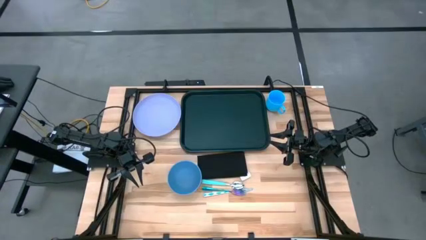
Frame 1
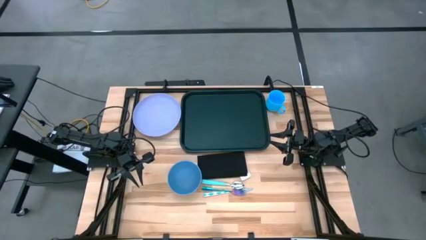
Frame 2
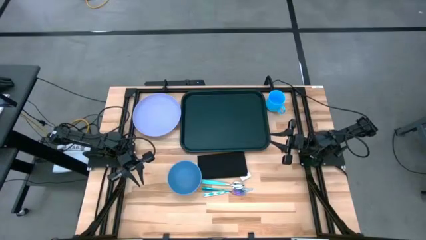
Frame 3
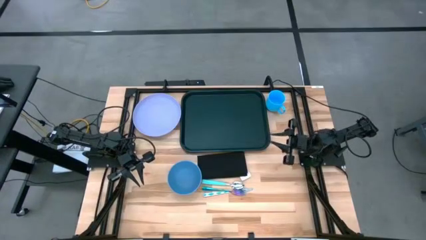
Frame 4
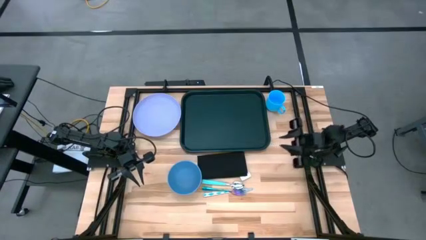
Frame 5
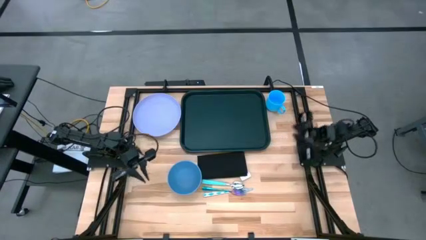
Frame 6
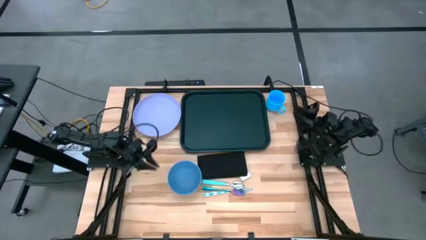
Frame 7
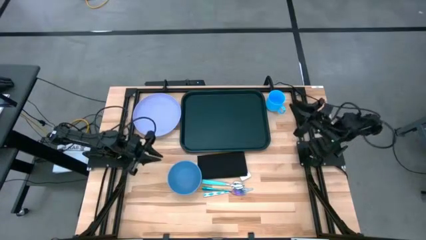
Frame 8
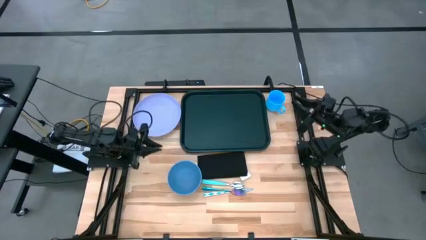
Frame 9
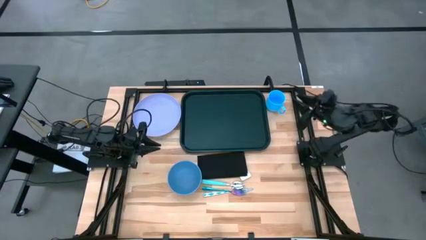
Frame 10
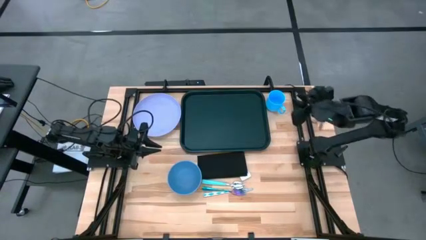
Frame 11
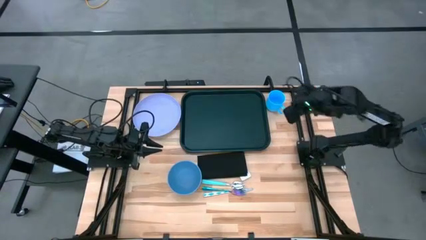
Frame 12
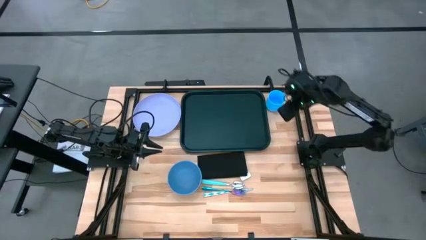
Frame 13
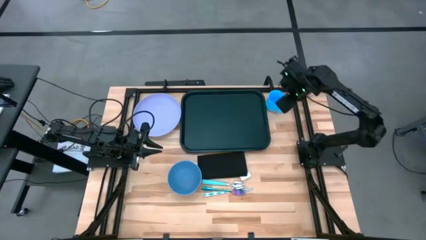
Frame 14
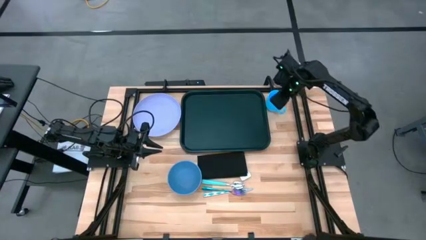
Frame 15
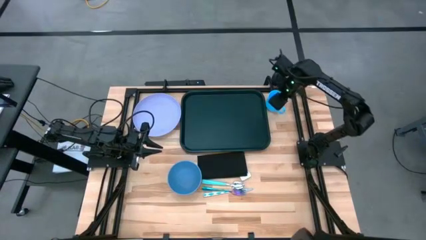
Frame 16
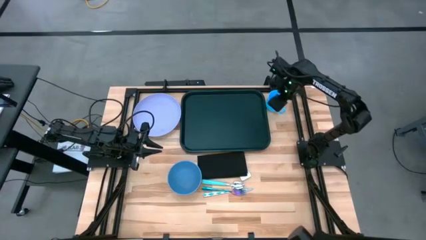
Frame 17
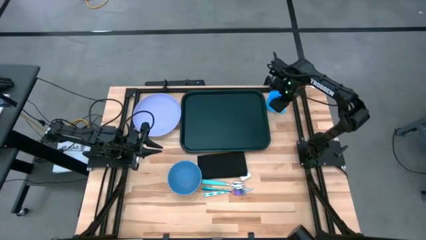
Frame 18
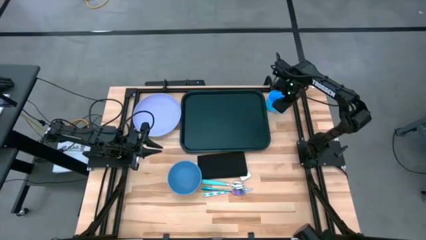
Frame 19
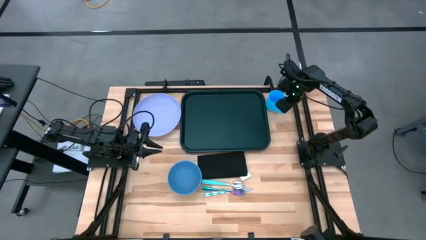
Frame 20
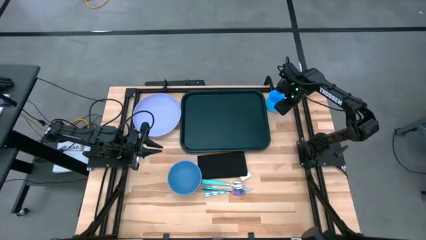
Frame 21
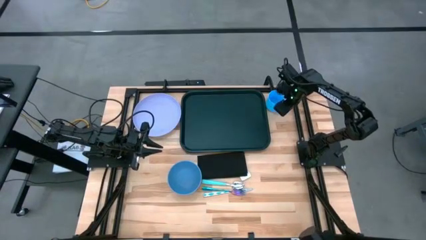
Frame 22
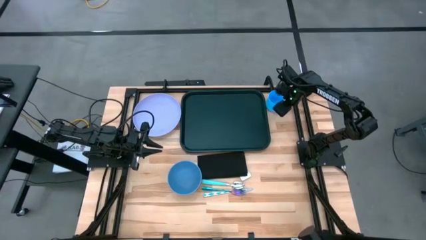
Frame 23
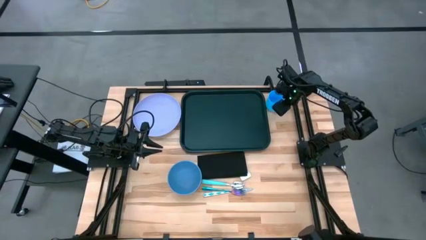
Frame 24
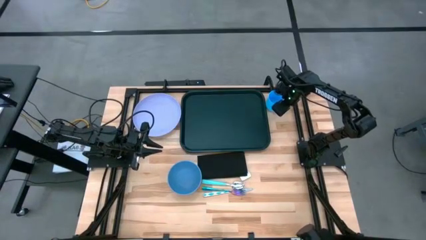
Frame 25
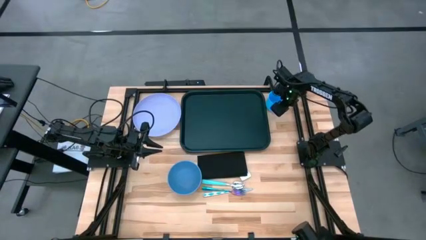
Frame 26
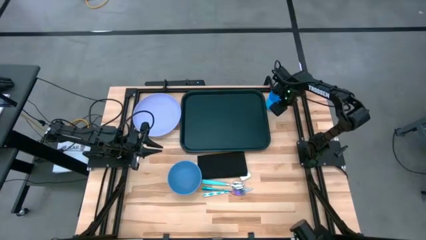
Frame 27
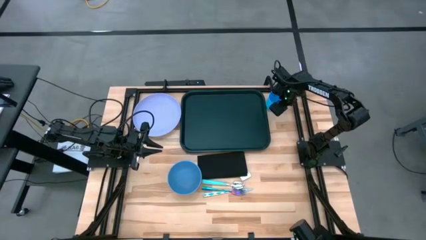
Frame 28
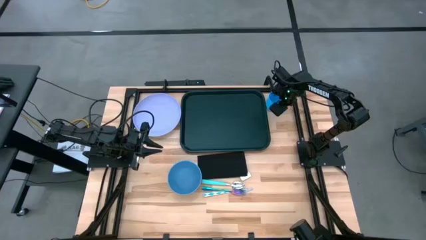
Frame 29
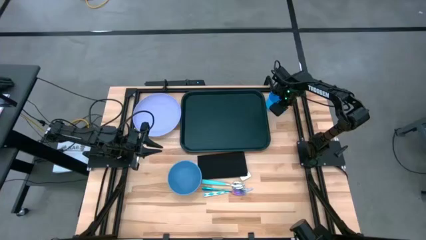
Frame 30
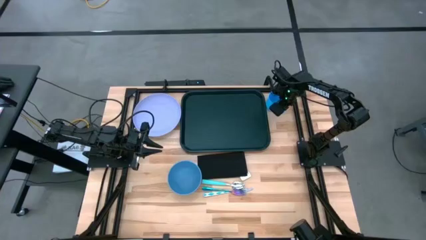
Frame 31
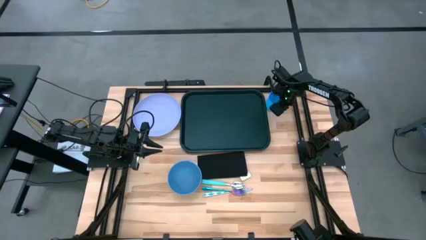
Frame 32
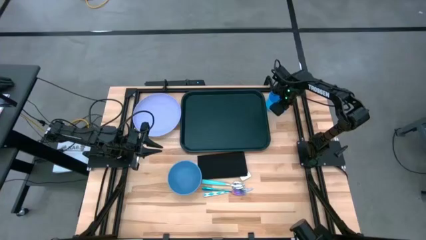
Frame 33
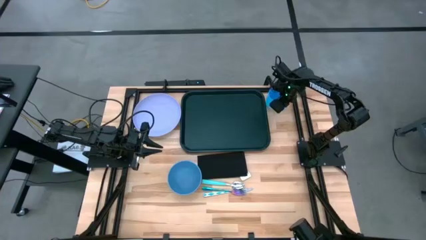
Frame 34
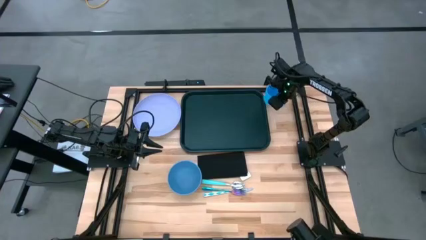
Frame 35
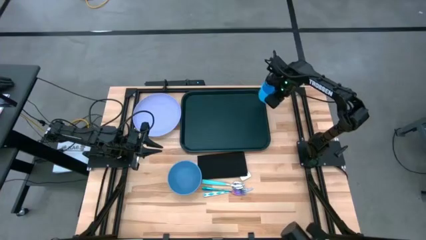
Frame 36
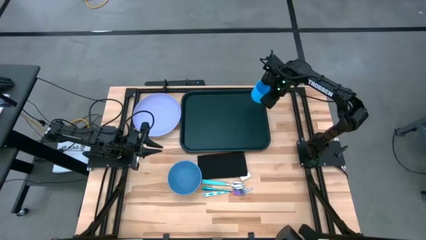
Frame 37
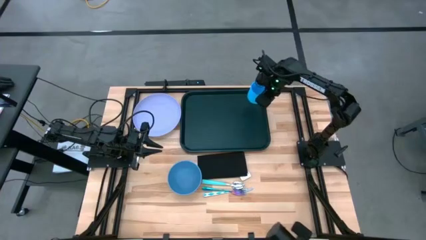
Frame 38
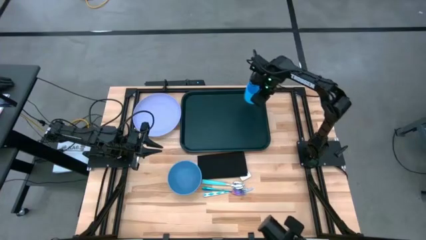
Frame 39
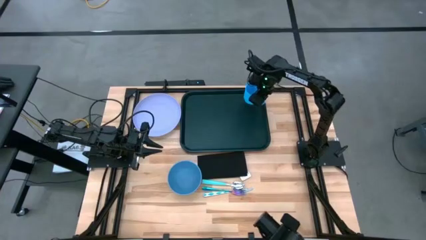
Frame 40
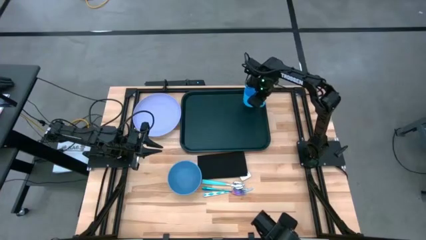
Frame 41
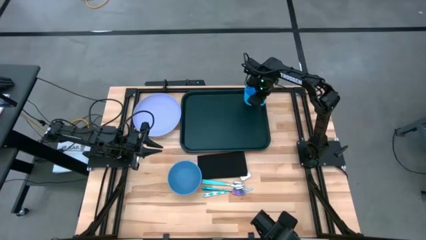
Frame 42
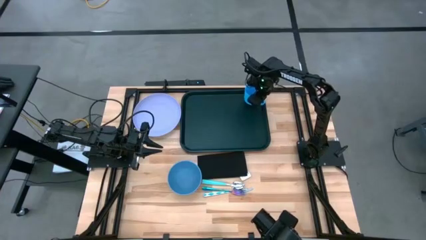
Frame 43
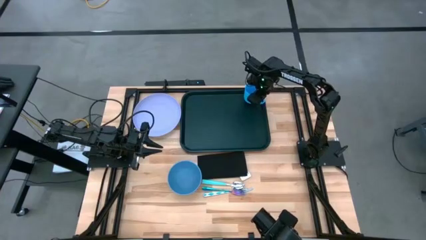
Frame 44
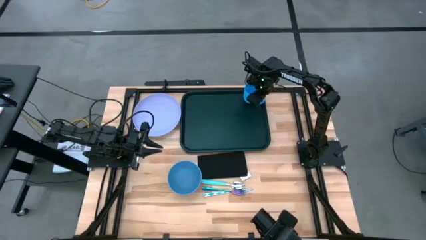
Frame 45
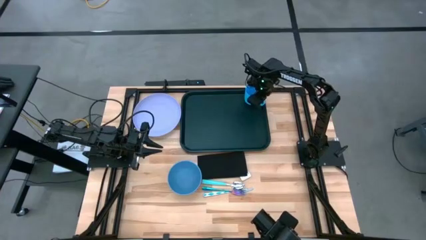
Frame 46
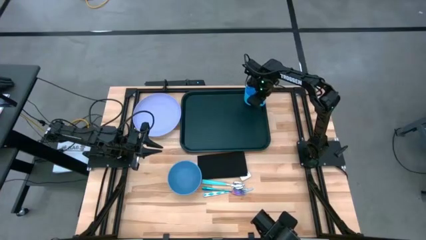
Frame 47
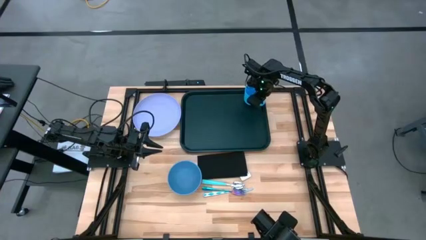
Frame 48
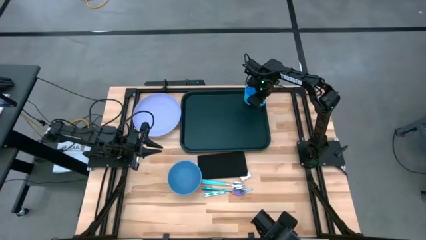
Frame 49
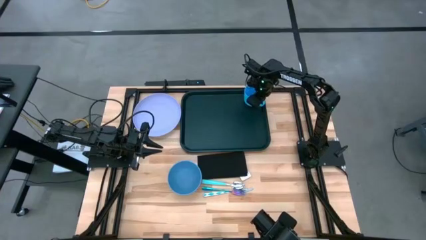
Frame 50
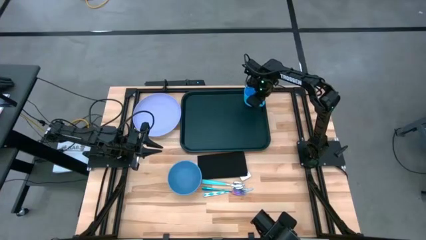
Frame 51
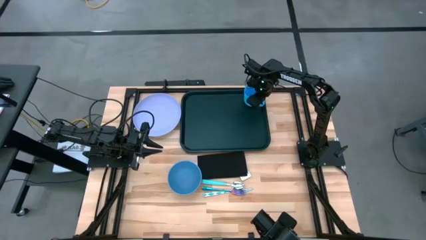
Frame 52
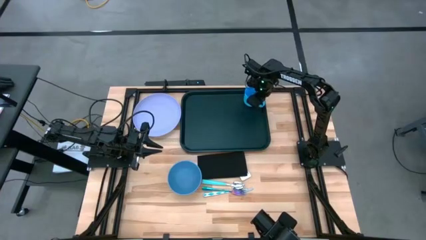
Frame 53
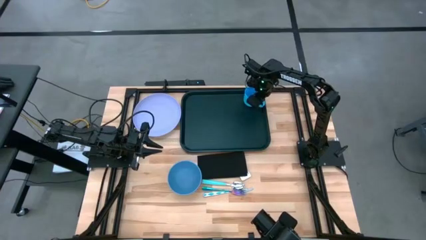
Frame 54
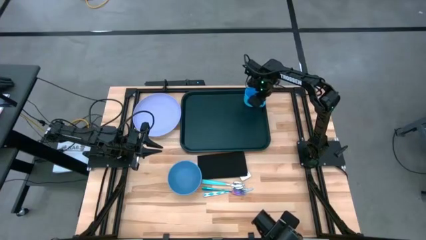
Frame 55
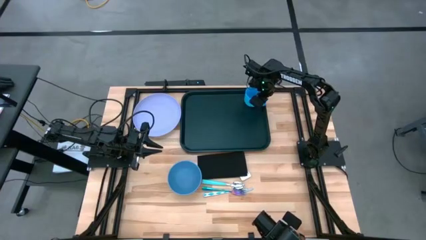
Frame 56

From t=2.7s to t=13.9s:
Task: Set up tray
Put the blue mug on the black tray
